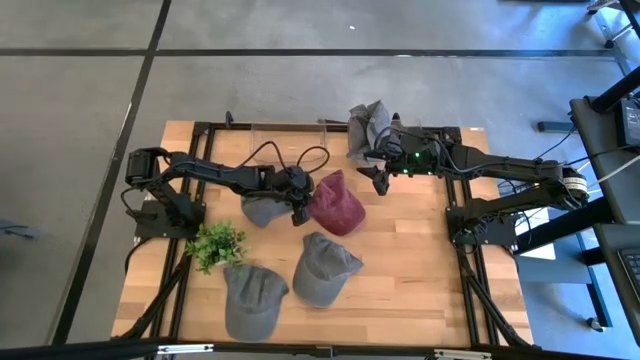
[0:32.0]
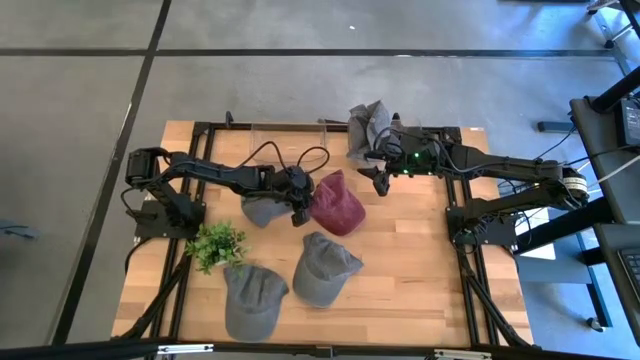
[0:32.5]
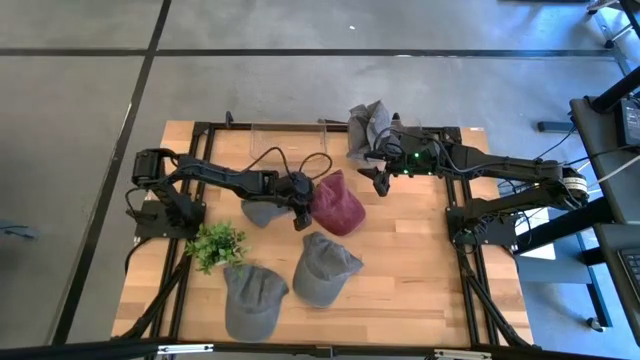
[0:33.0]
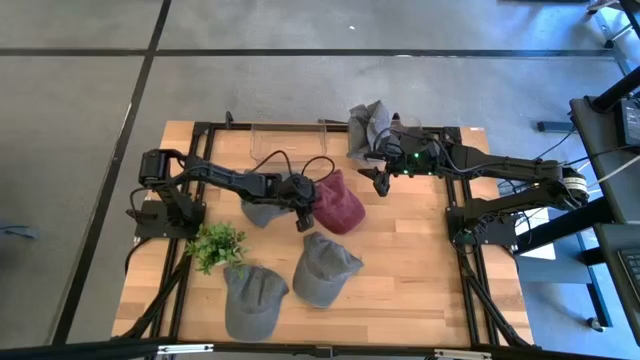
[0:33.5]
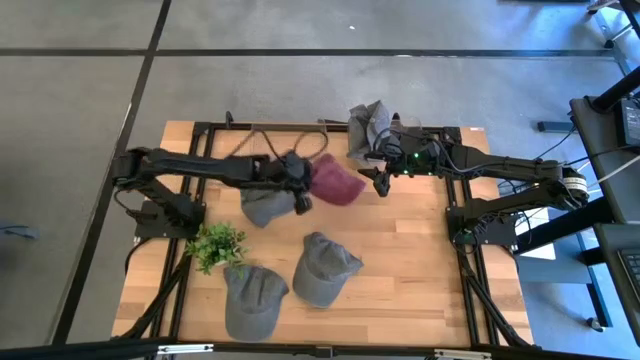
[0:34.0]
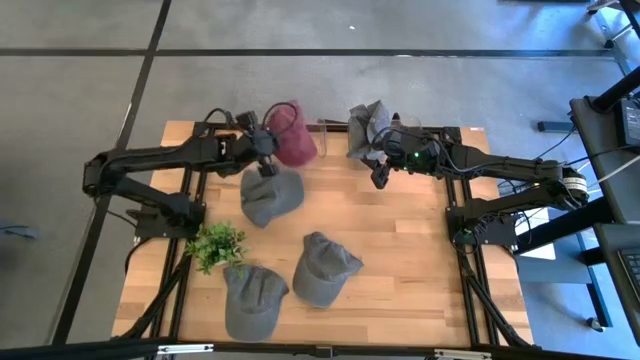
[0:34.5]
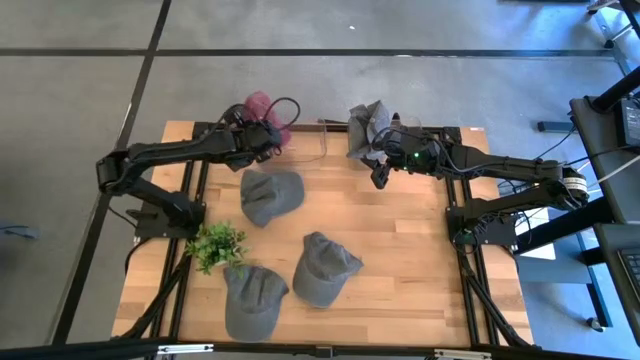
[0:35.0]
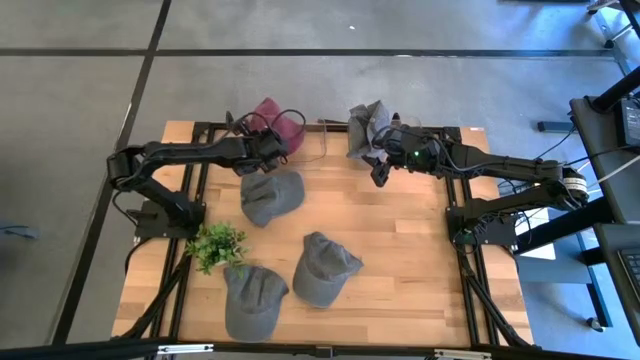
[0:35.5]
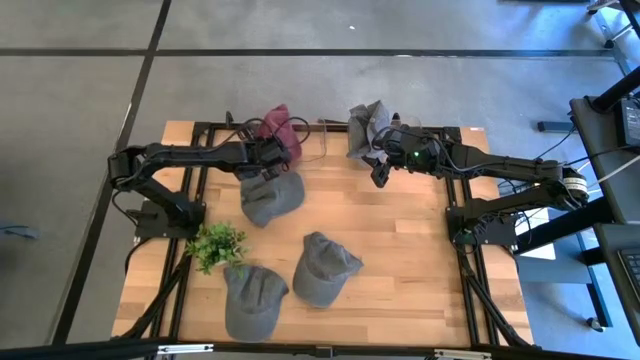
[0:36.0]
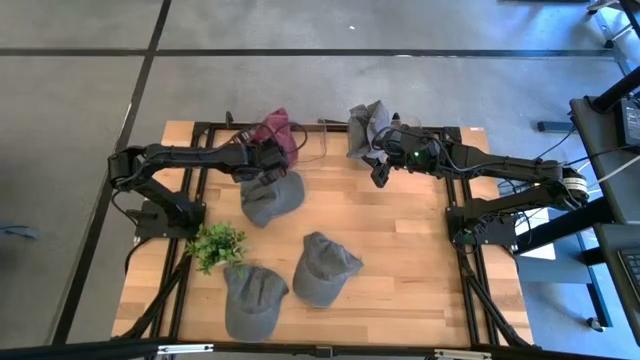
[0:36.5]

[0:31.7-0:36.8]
Task: Pick & Place hat
Put the red cap into the left transparent bin

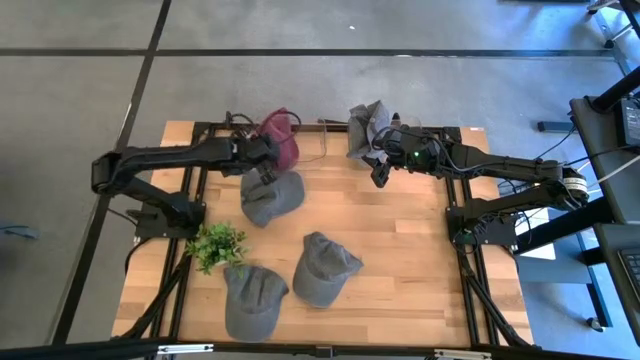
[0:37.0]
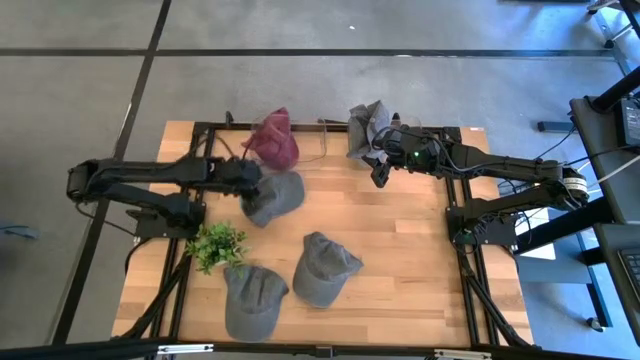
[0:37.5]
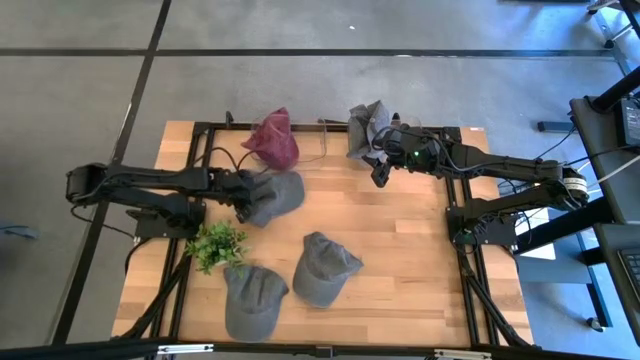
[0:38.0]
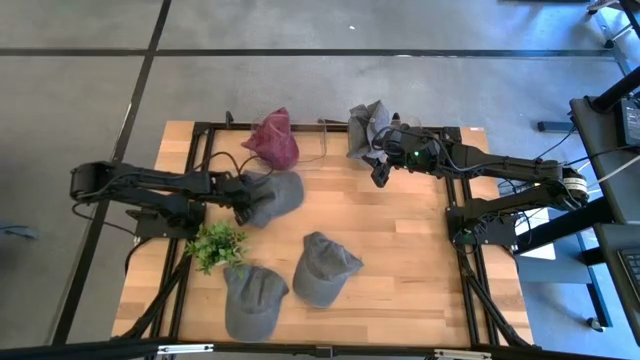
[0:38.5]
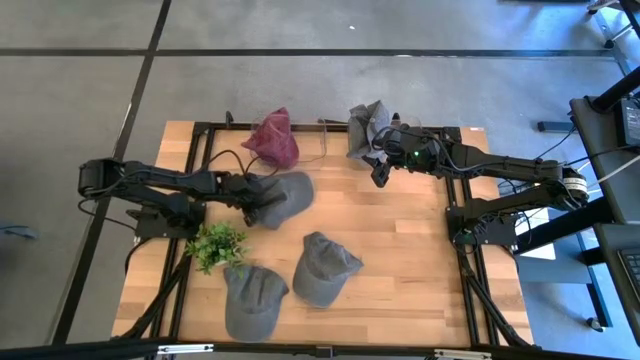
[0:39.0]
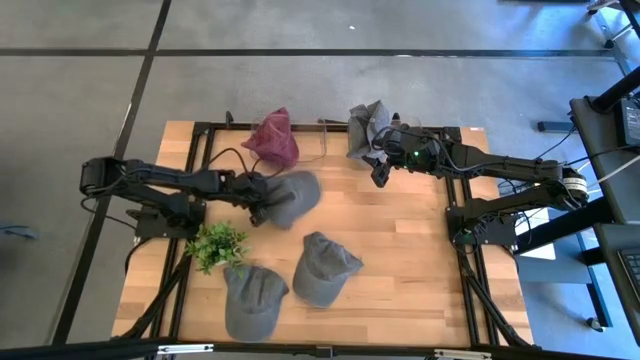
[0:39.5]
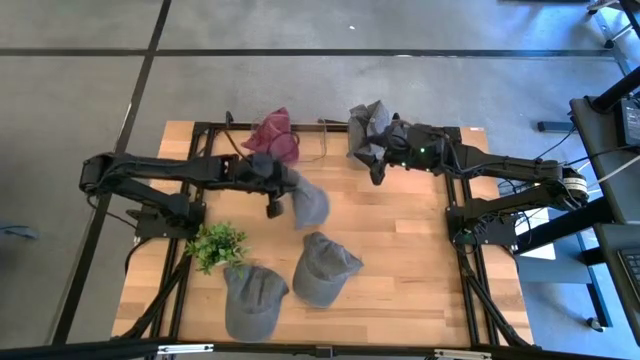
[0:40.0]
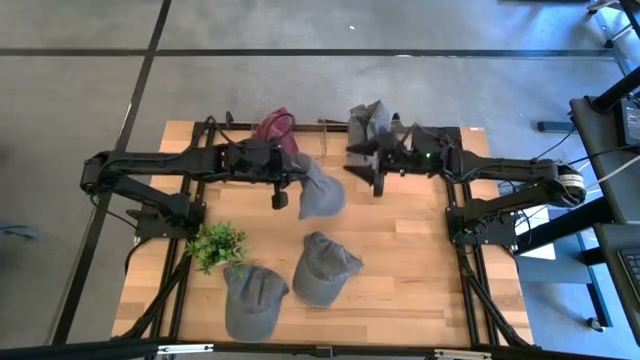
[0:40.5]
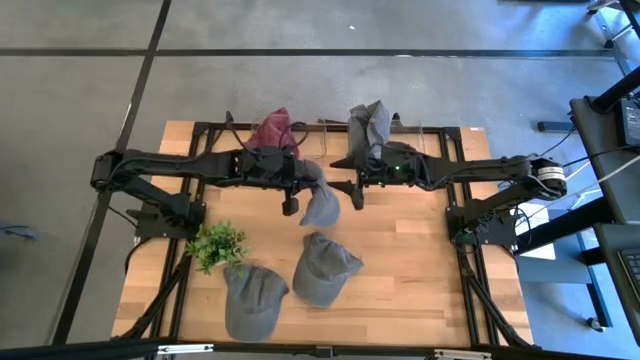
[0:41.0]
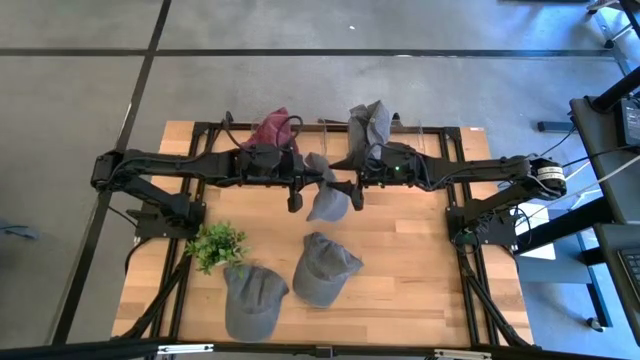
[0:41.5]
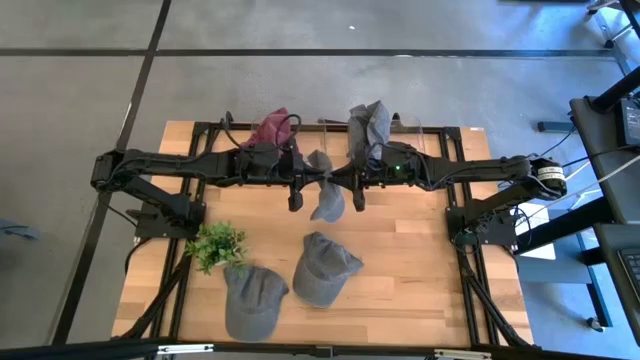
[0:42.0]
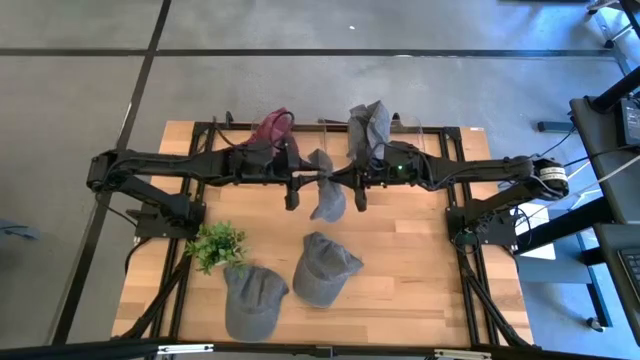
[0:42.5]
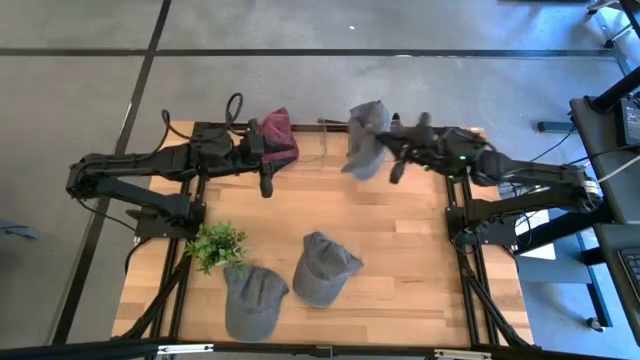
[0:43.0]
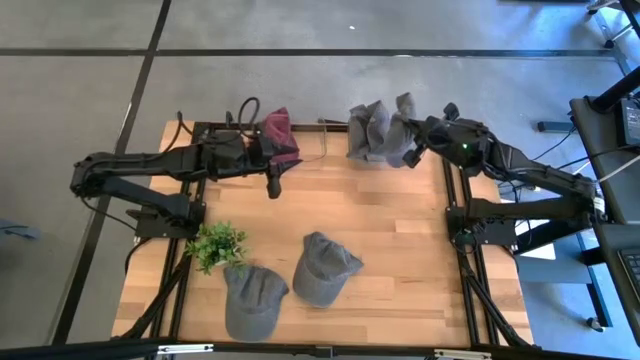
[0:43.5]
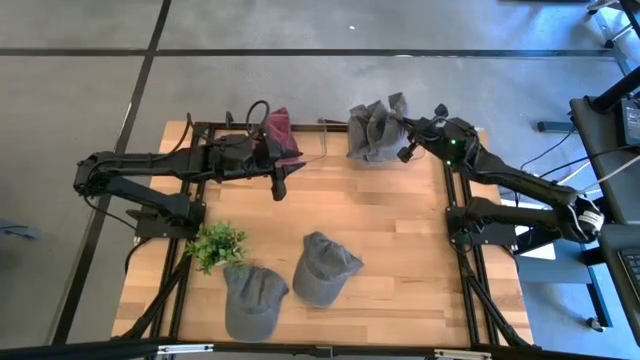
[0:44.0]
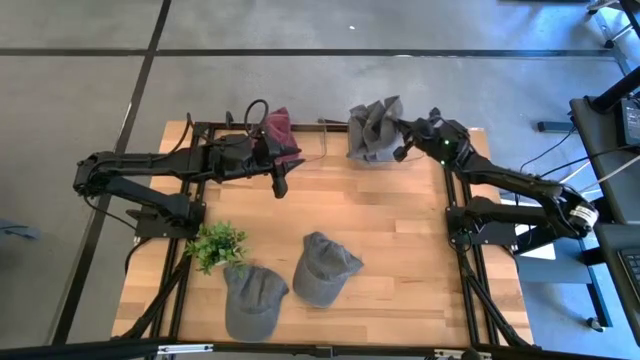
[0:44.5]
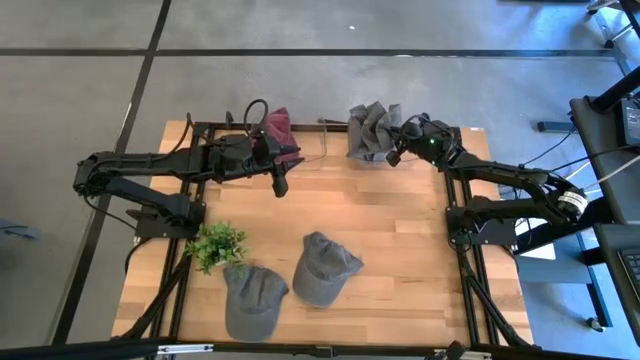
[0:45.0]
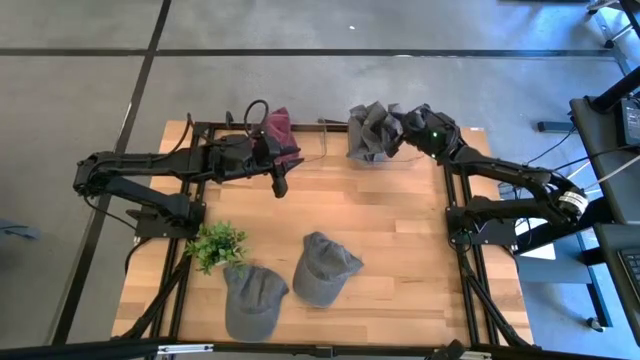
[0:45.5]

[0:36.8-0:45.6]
Put the gray cap into the right transparent bin
